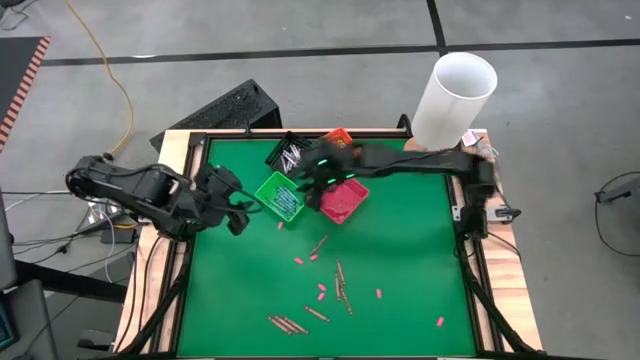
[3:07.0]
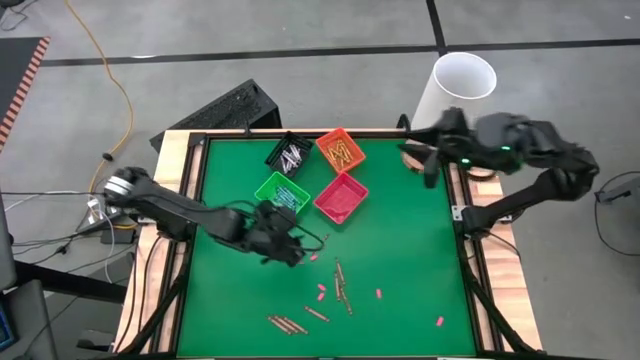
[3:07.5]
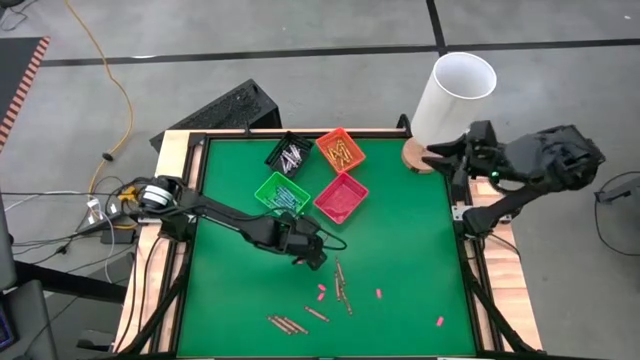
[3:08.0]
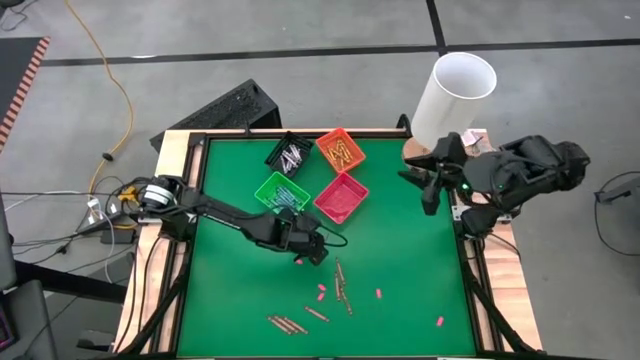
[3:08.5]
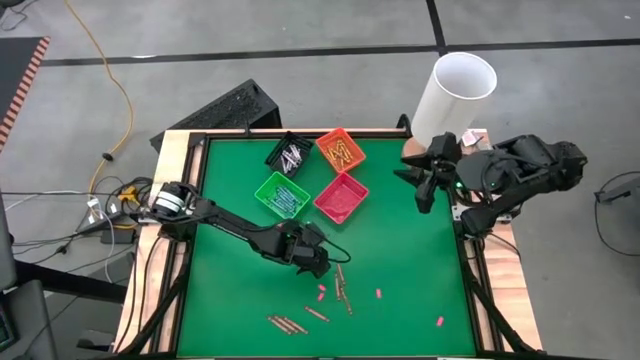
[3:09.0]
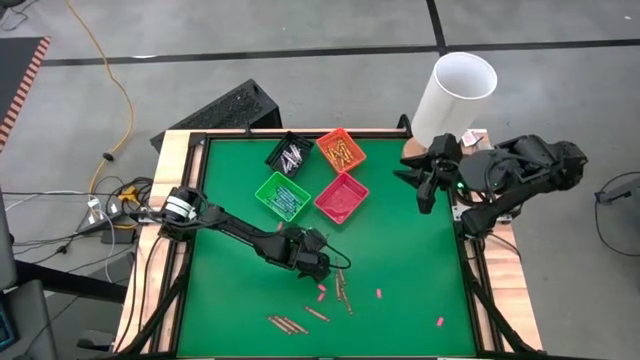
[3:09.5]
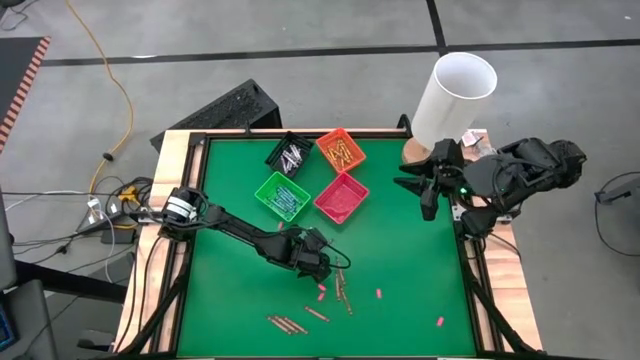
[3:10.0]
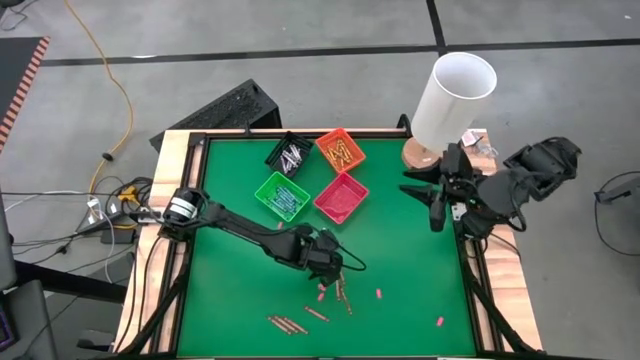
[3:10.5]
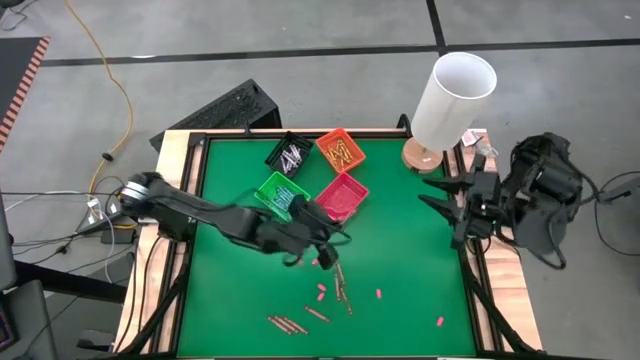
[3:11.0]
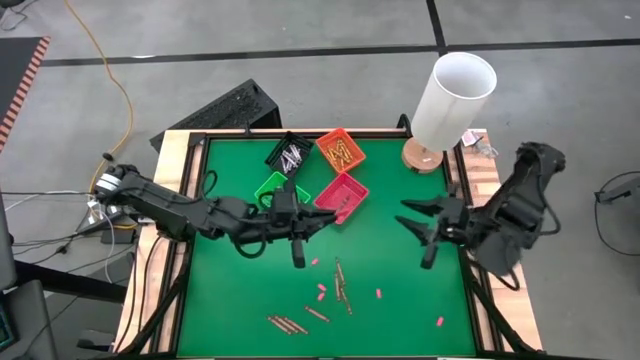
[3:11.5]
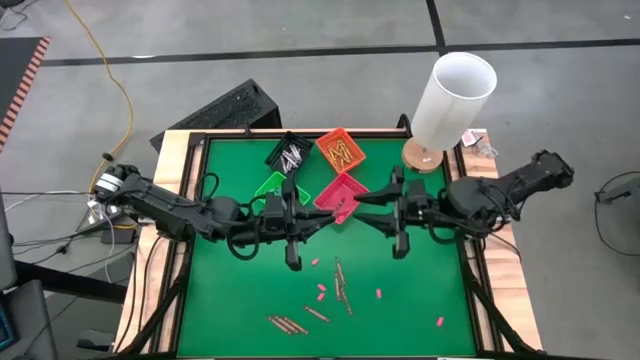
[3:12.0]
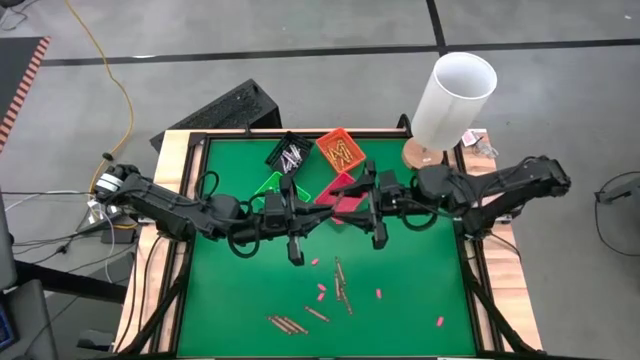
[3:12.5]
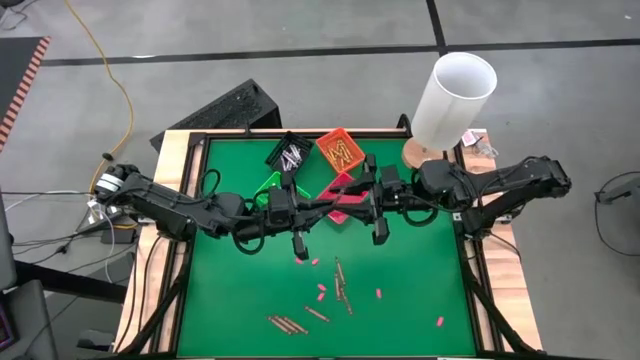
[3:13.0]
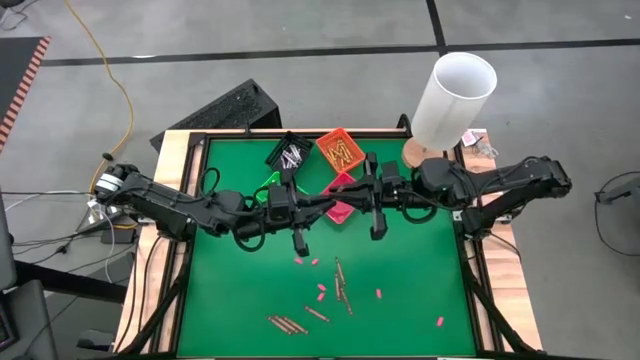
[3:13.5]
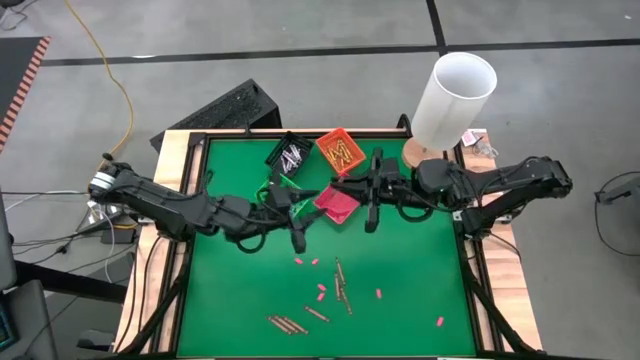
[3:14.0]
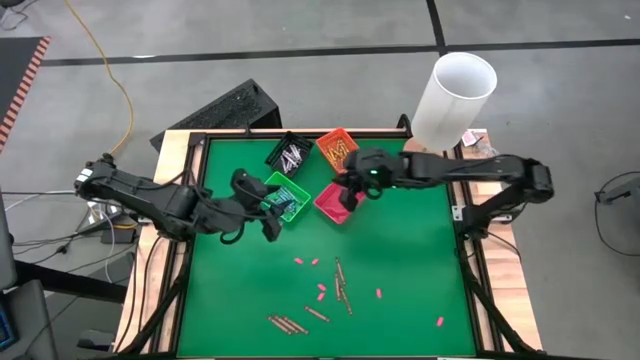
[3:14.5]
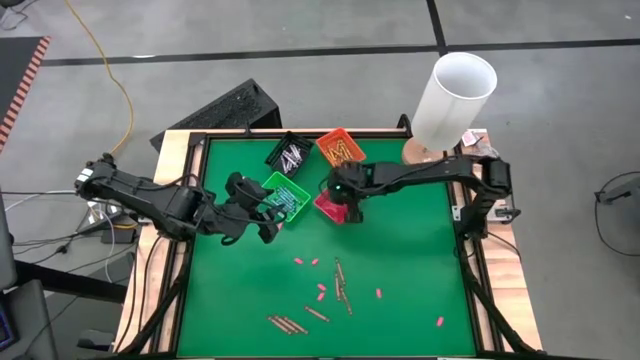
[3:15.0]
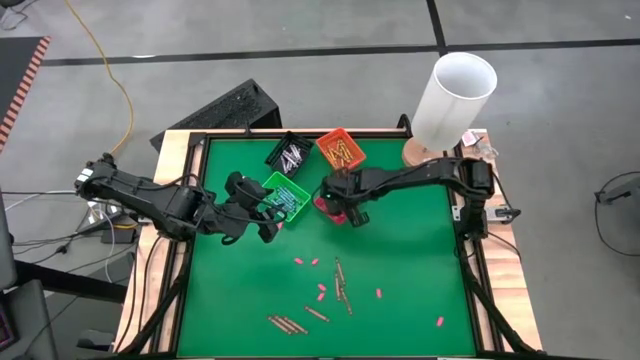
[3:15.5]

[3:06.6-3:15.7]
Task: Sort crayons
Put the brown crayon into the bin

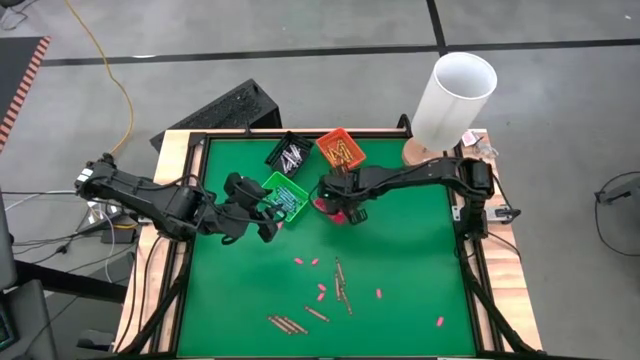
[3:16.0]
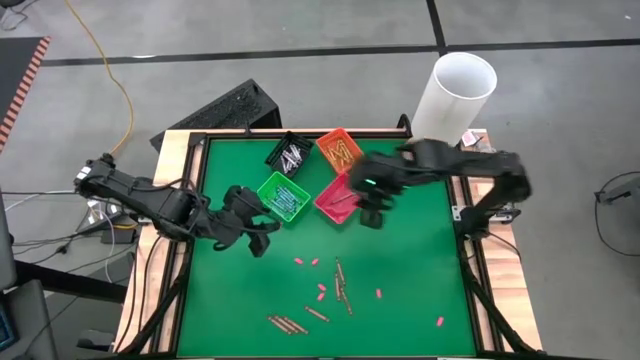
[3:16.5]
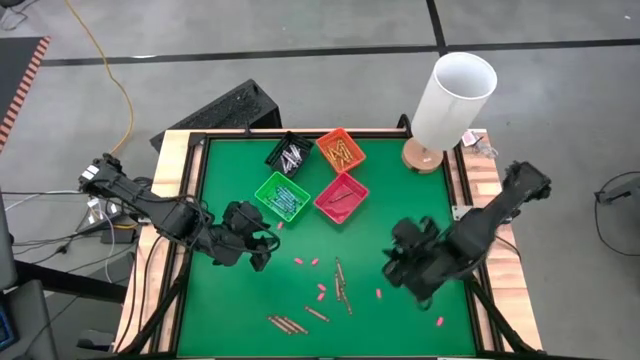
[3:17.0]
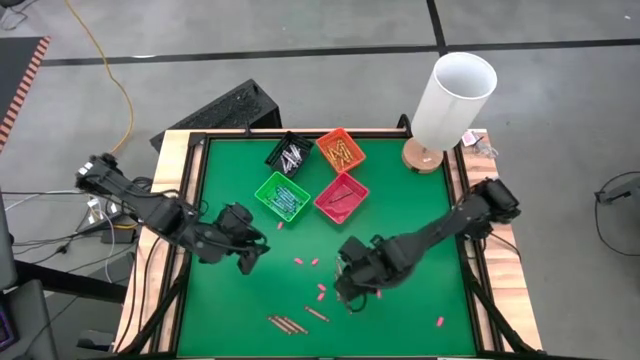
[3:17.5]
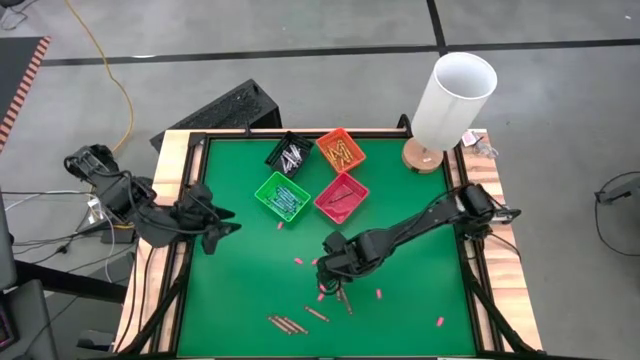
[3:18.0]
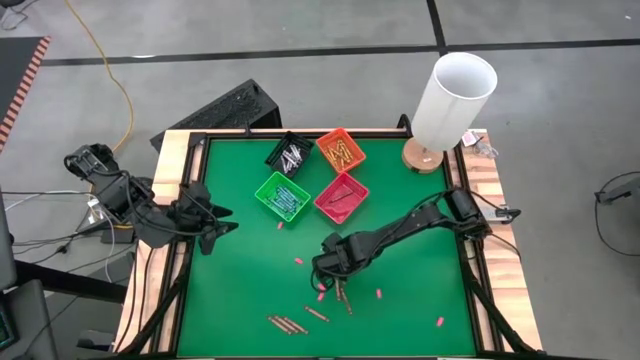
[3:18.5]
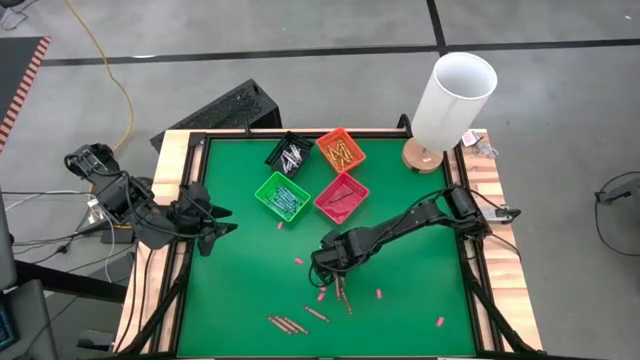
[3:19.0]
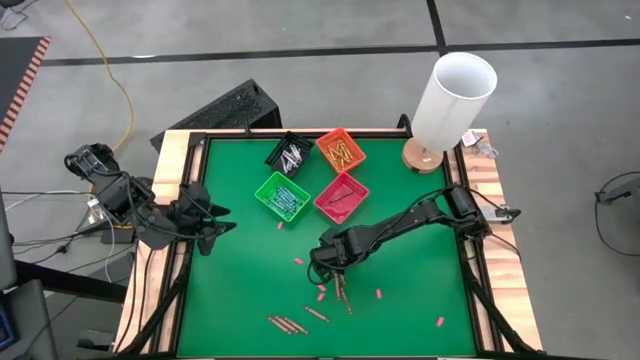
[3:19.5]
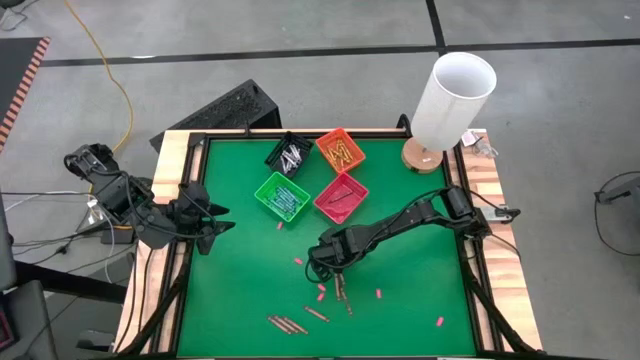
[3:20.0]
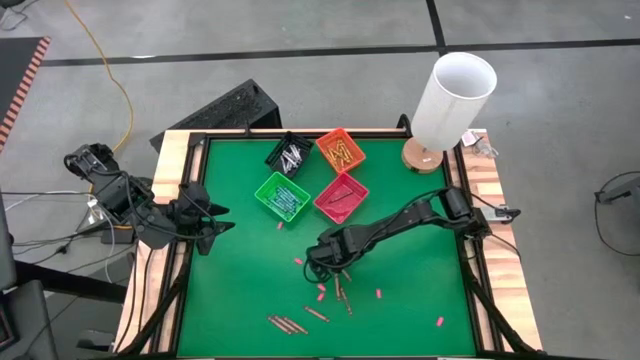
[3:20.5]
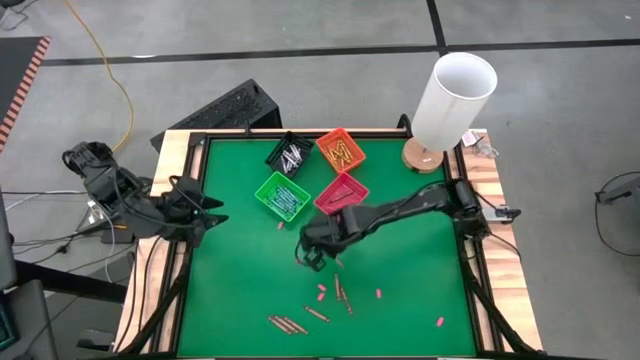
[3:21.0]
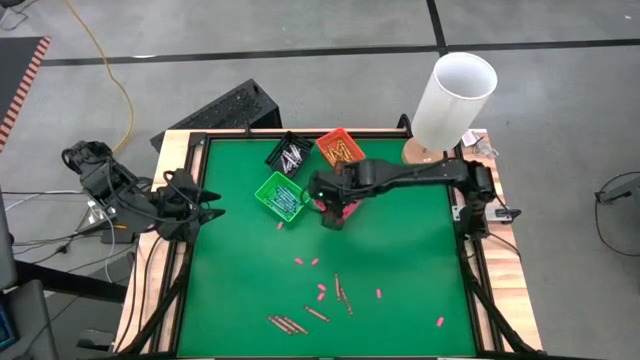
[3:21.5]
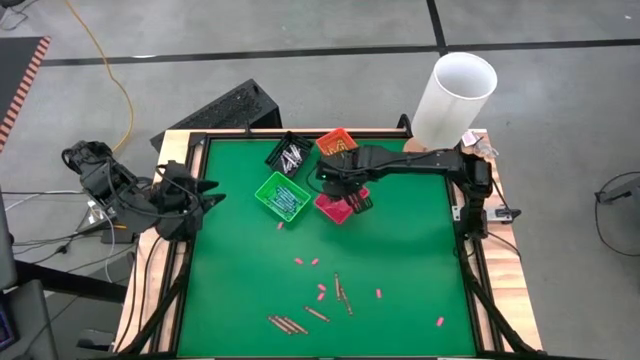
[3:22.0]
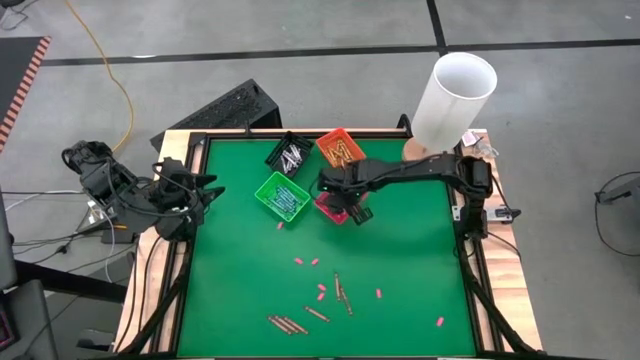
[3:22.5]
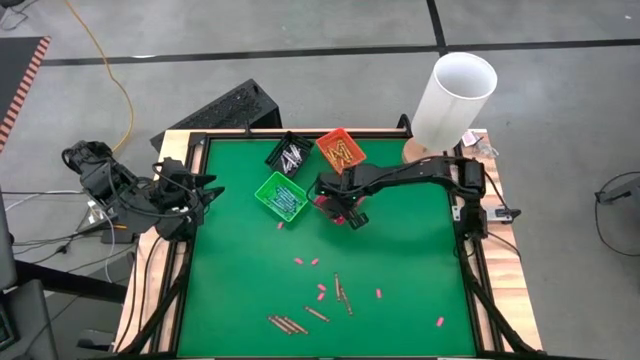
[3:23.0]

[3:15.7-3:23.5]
Put the brown crayon into the bin

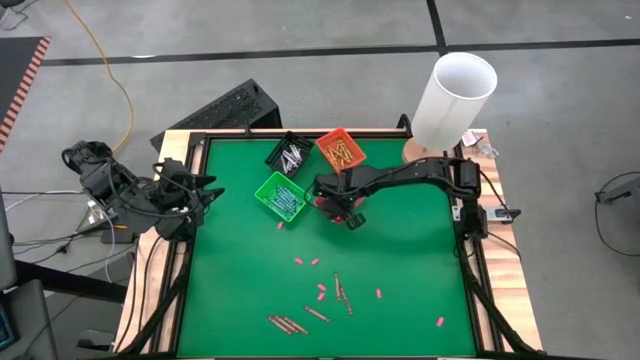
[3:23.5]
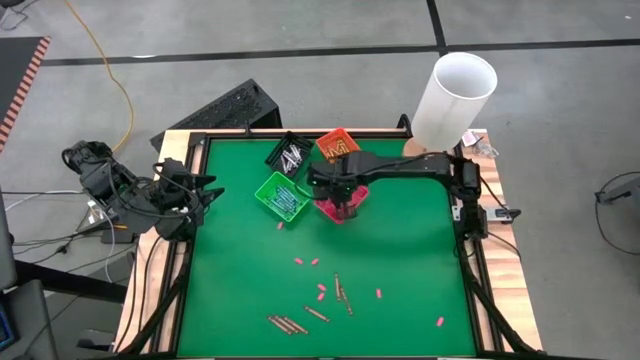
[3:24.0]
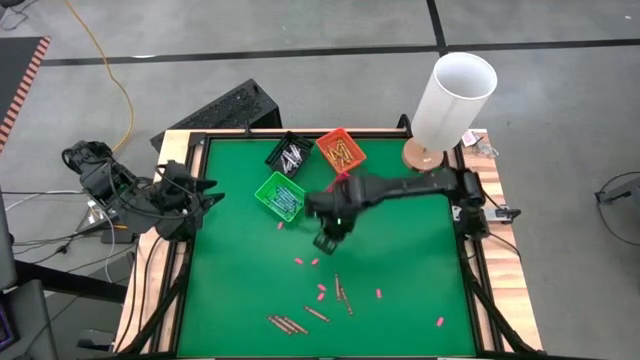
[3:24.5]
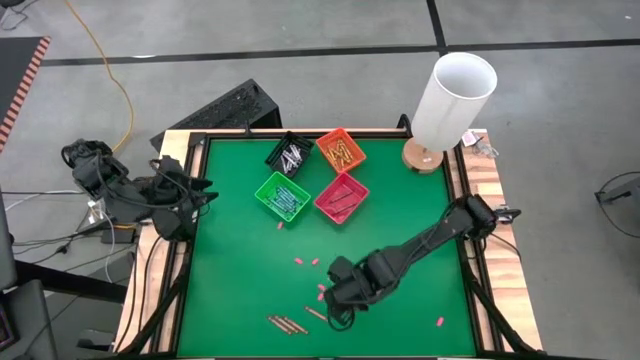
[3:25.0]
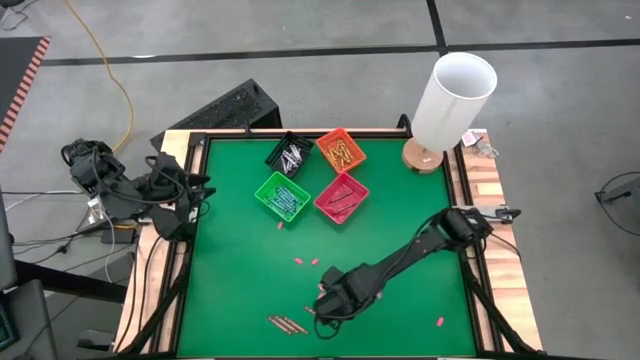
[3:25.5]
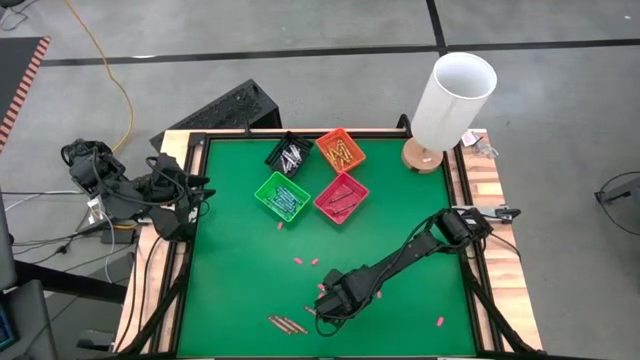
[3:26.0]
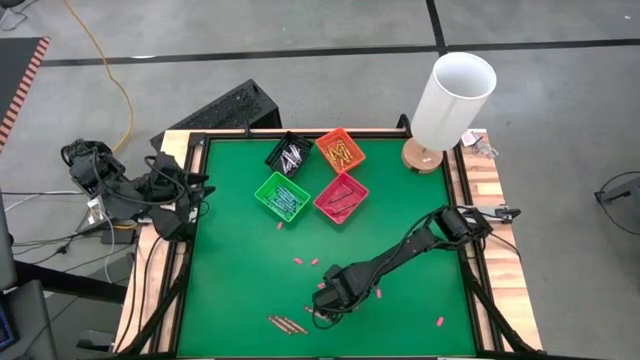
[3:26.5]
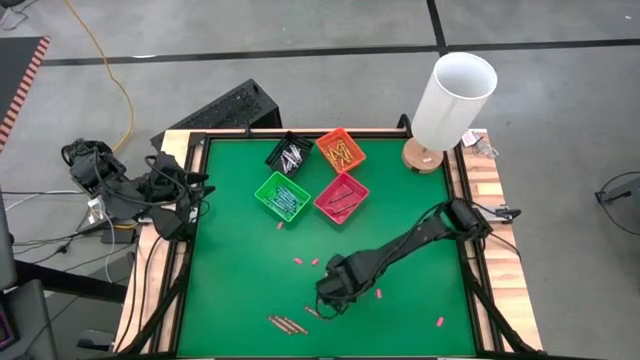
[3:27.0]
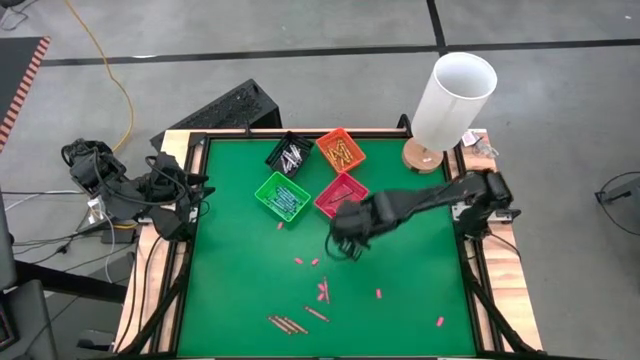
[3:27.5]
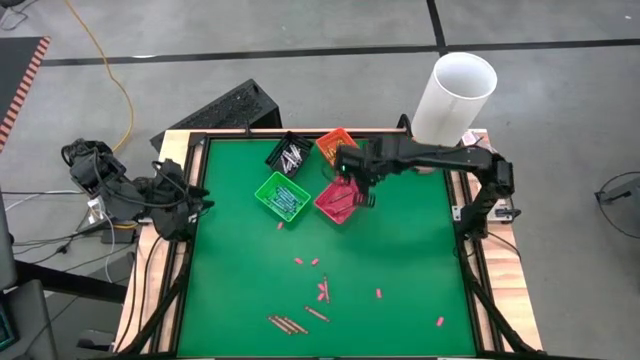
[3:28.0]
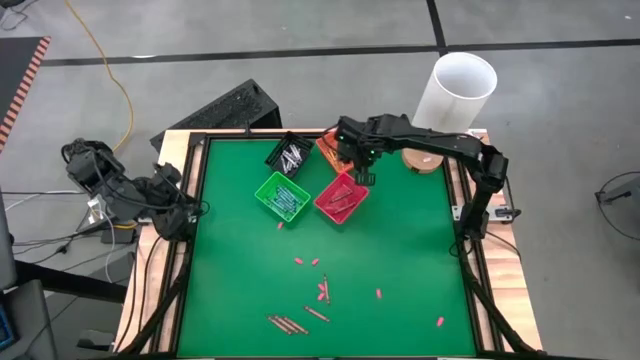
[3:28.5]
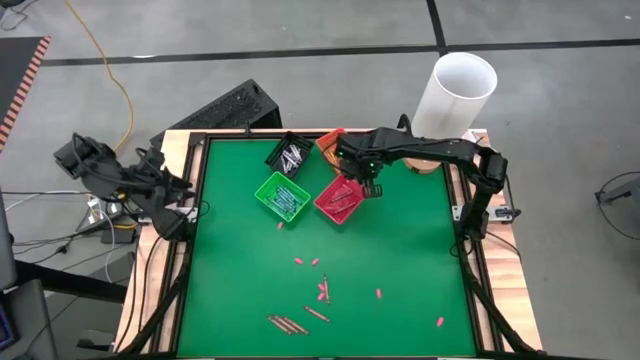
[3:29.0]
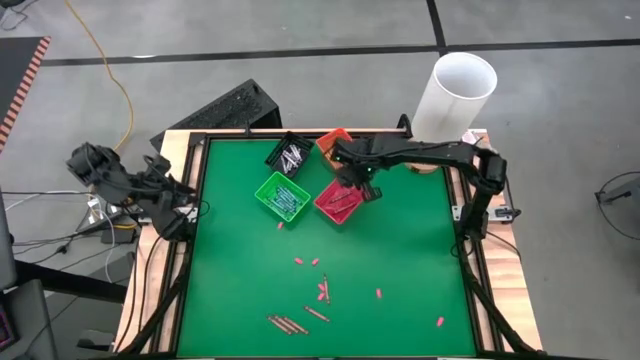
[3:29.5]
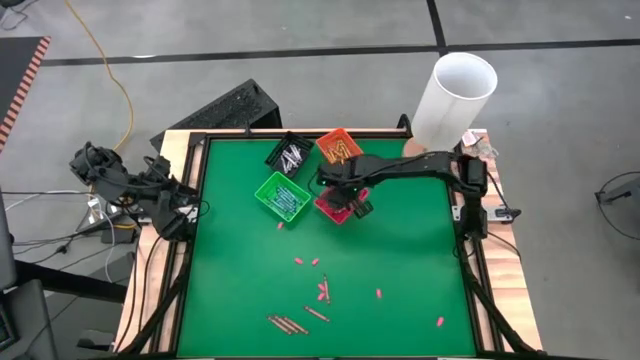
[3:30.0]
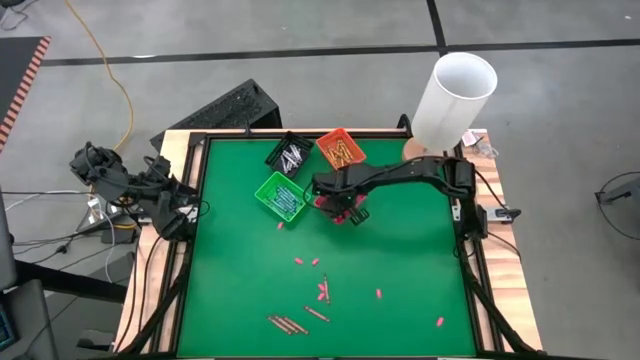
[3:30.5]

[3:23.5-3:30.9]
Put the brown crayon into the bin
